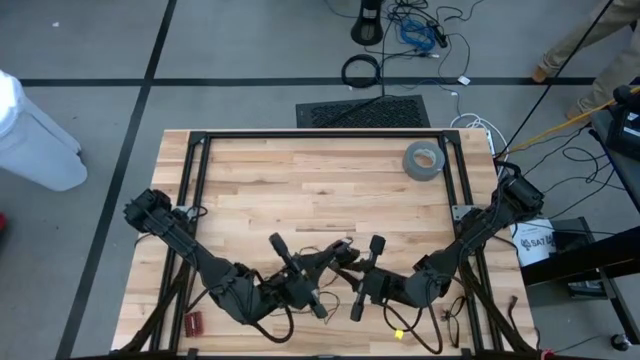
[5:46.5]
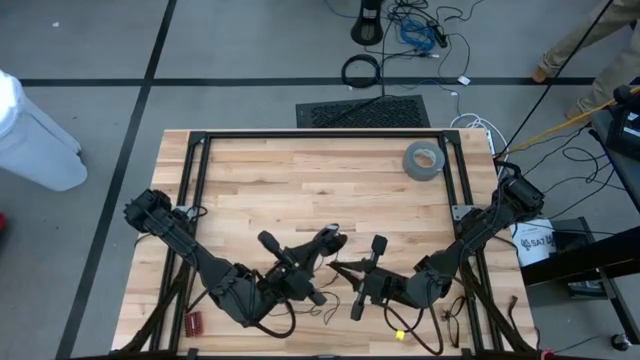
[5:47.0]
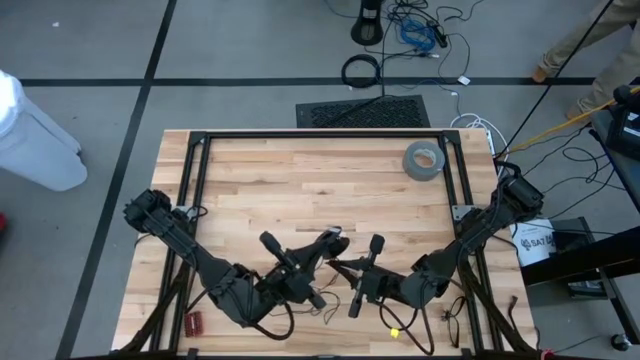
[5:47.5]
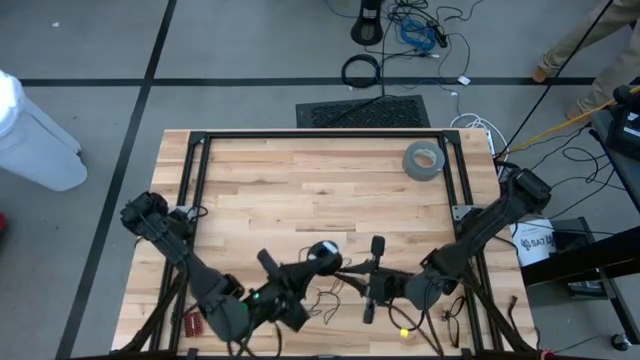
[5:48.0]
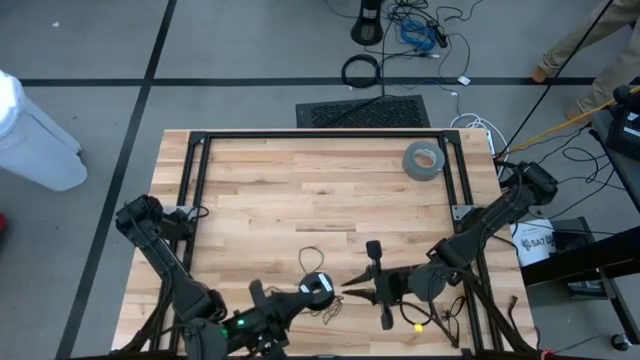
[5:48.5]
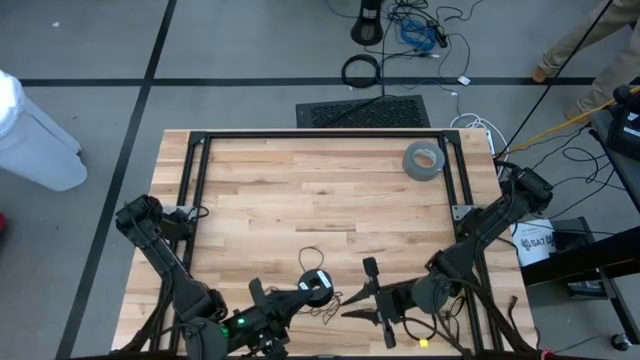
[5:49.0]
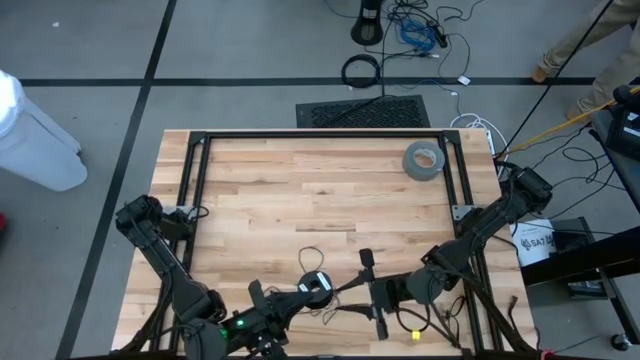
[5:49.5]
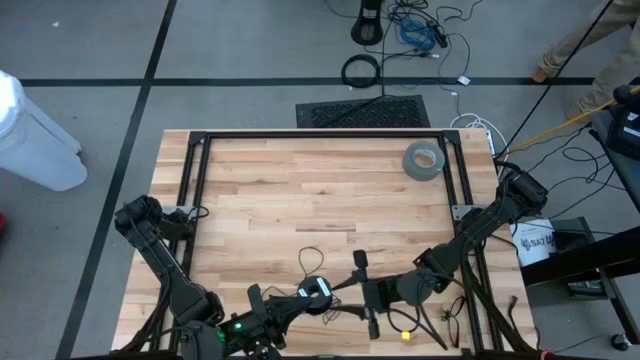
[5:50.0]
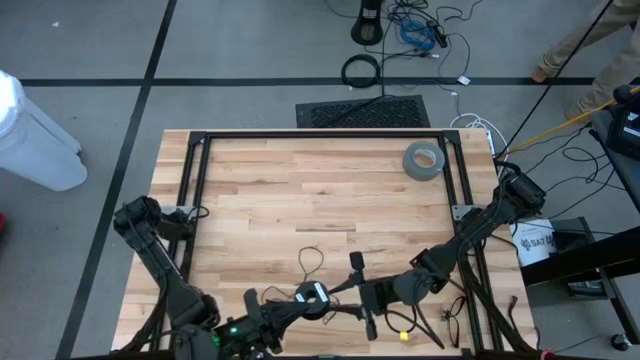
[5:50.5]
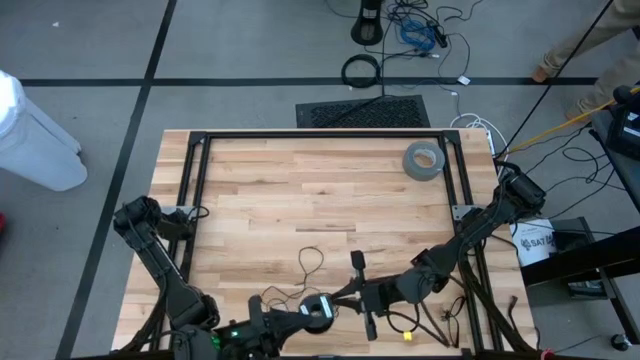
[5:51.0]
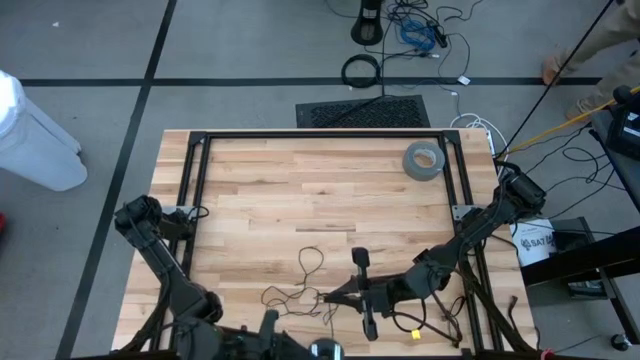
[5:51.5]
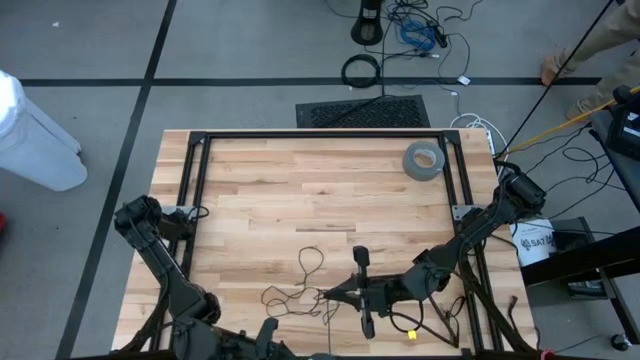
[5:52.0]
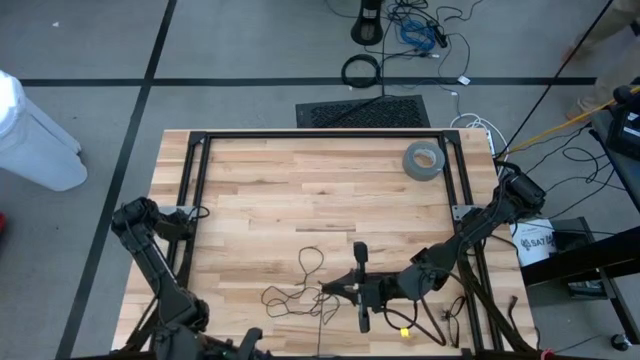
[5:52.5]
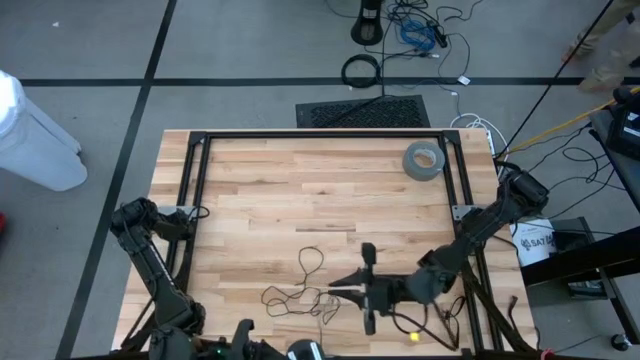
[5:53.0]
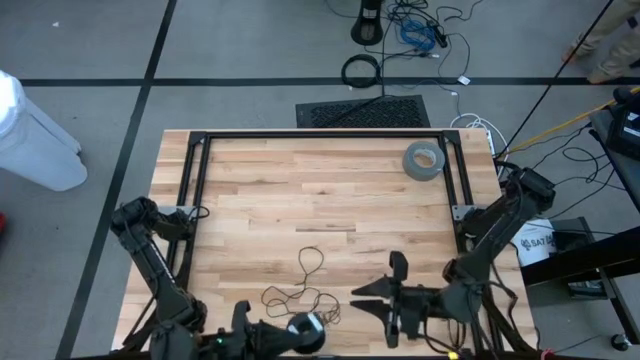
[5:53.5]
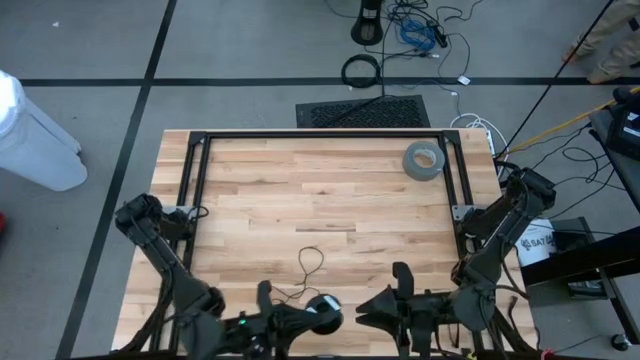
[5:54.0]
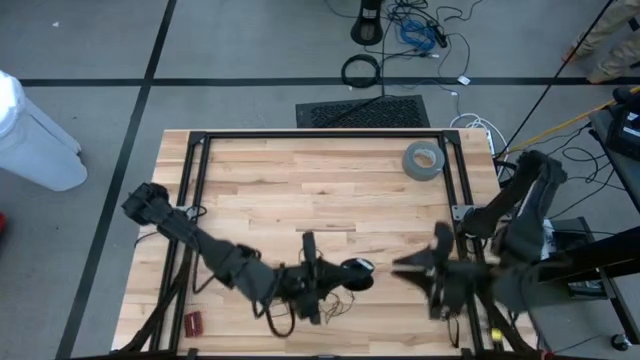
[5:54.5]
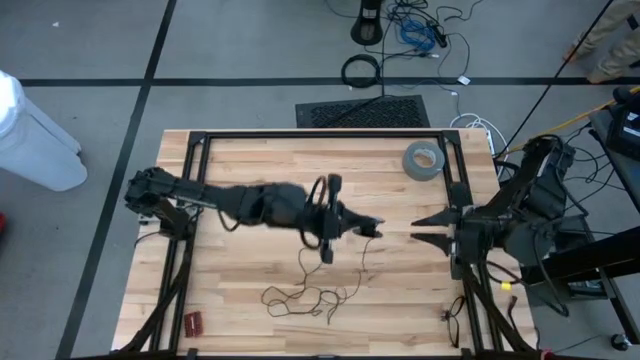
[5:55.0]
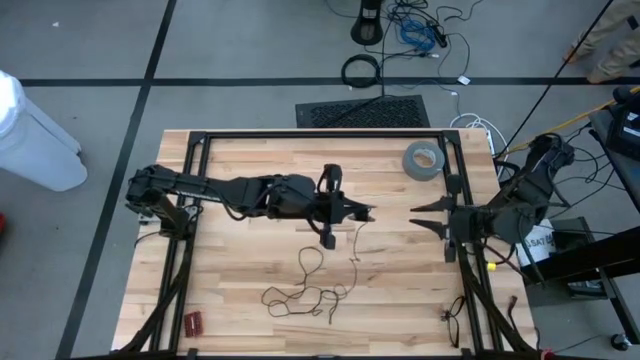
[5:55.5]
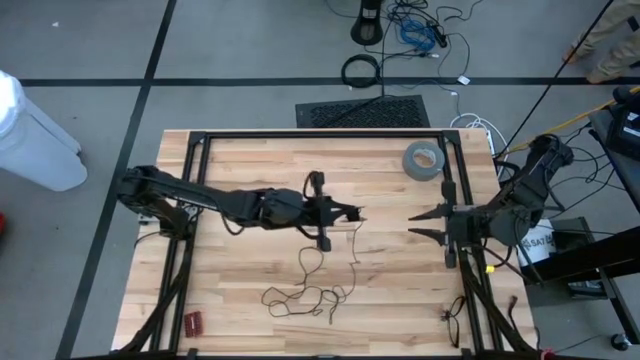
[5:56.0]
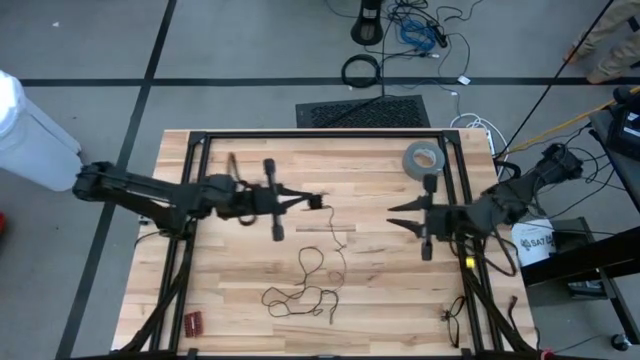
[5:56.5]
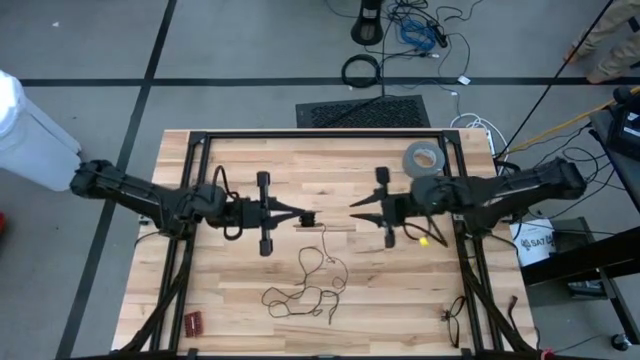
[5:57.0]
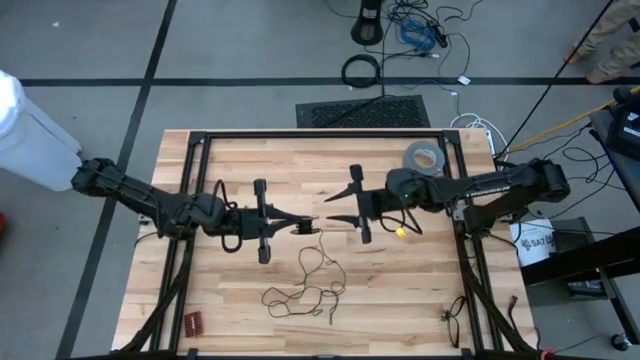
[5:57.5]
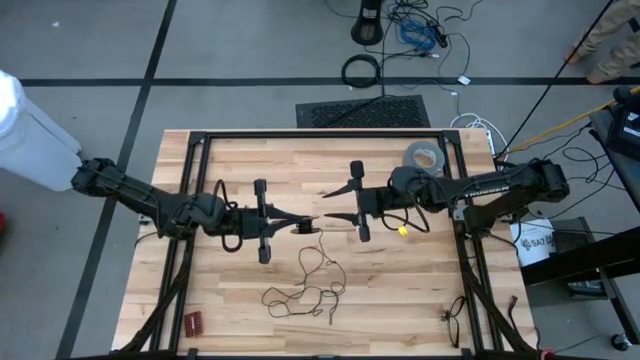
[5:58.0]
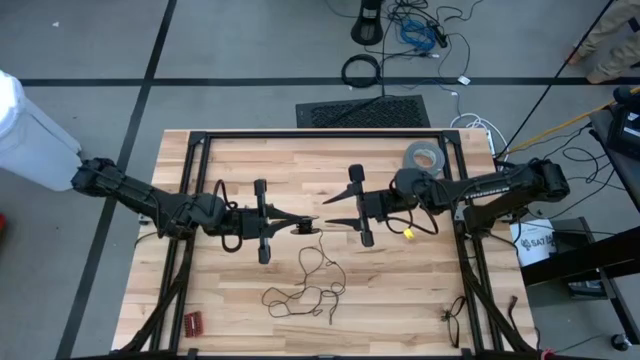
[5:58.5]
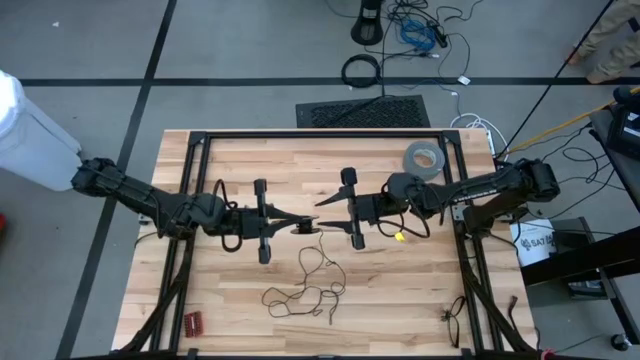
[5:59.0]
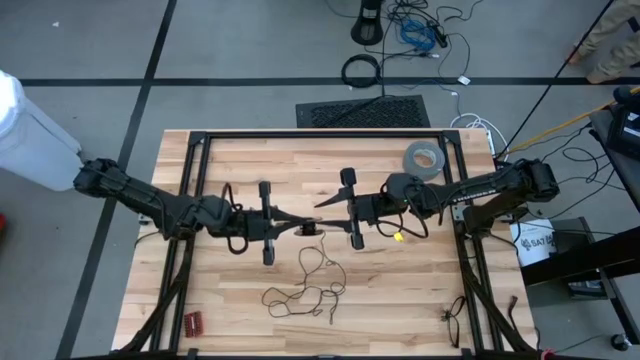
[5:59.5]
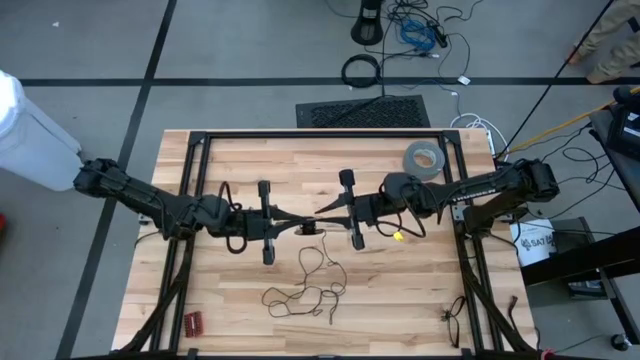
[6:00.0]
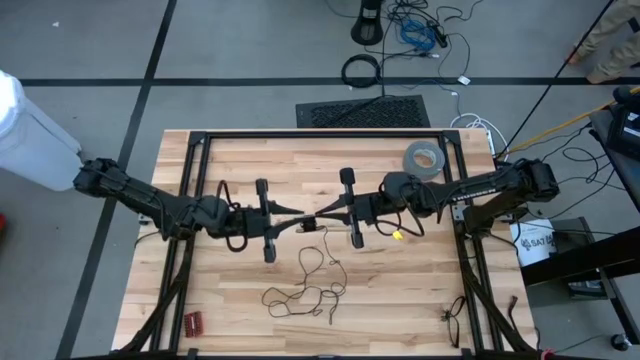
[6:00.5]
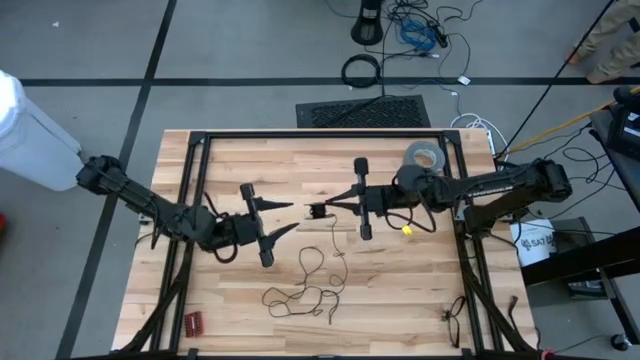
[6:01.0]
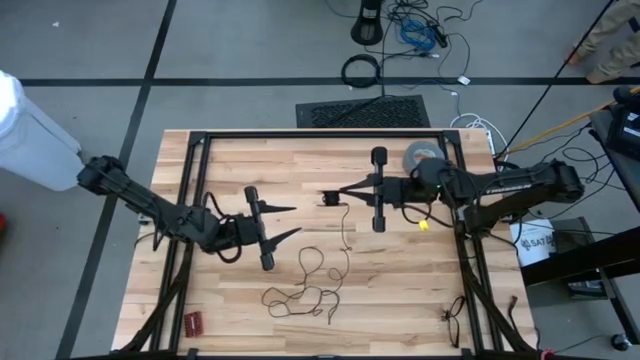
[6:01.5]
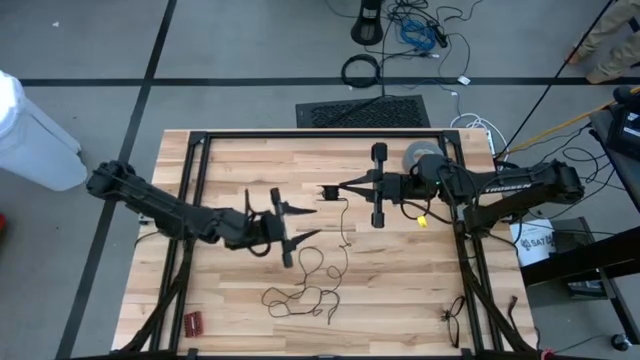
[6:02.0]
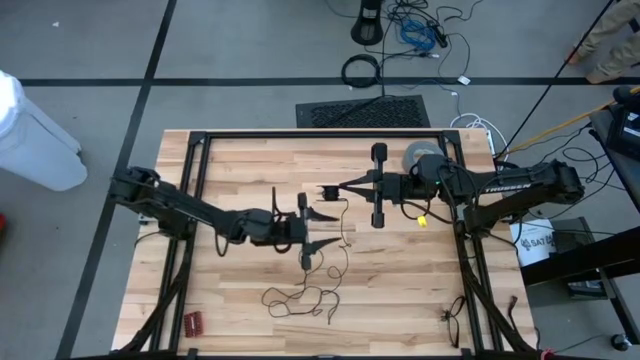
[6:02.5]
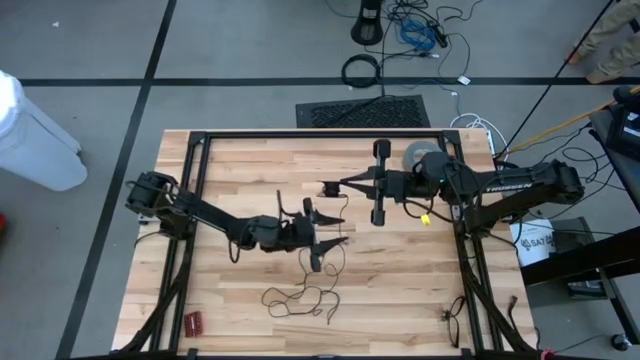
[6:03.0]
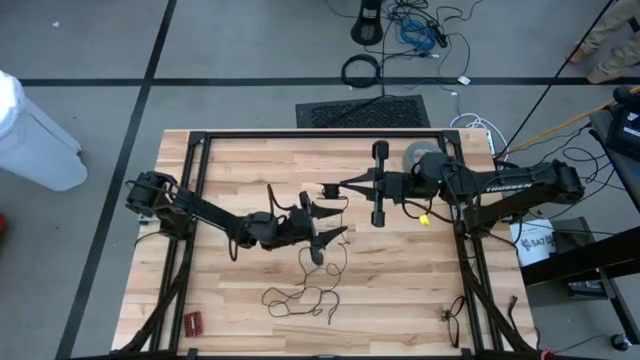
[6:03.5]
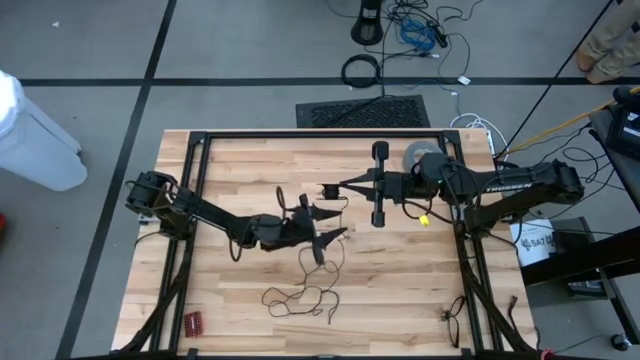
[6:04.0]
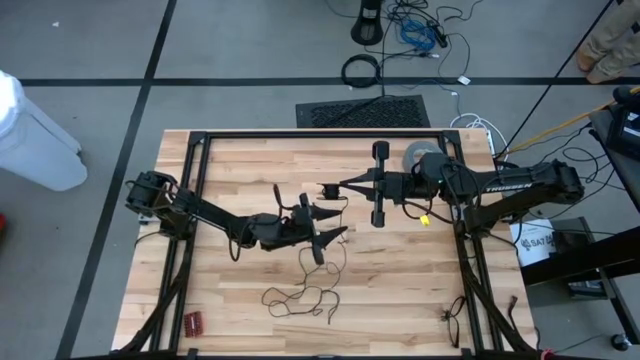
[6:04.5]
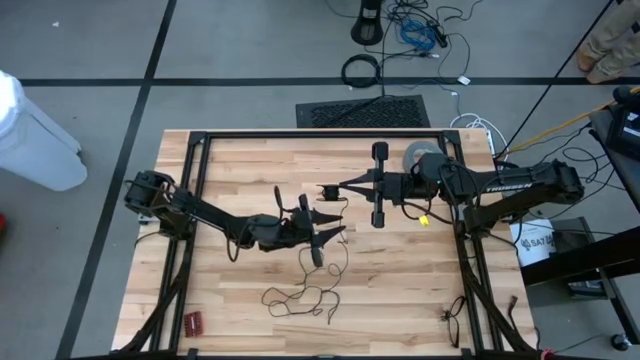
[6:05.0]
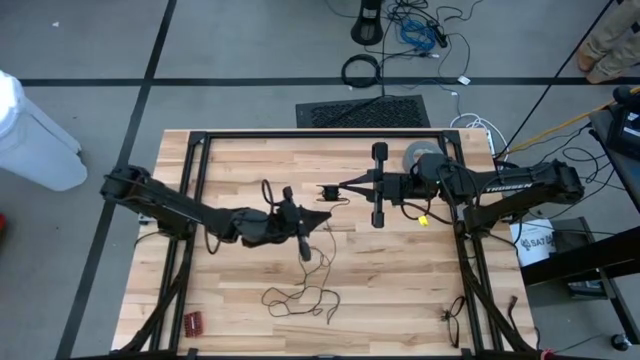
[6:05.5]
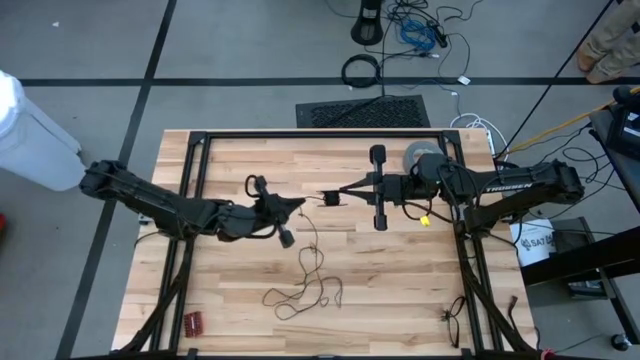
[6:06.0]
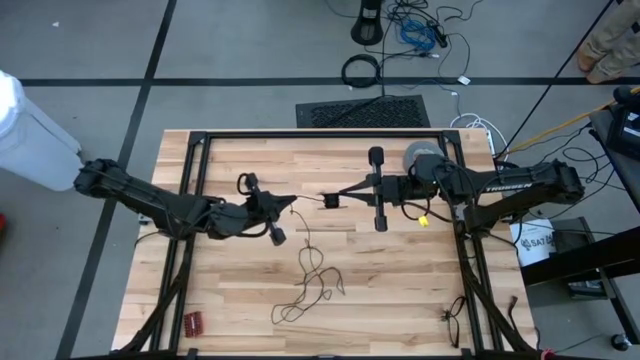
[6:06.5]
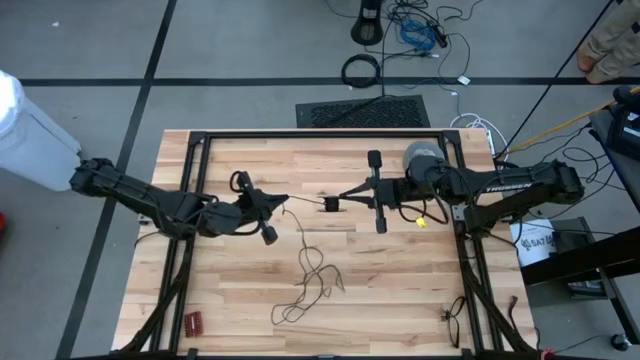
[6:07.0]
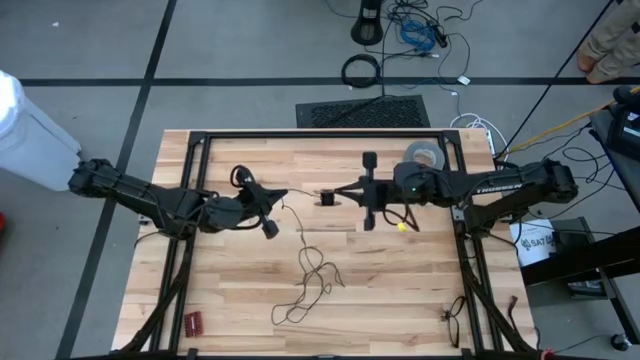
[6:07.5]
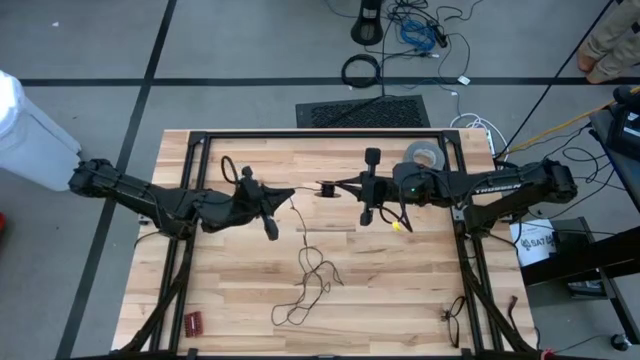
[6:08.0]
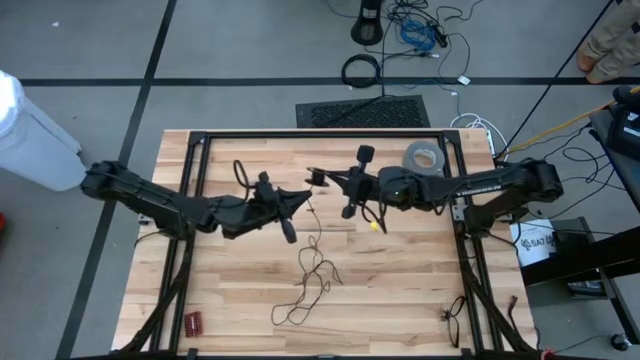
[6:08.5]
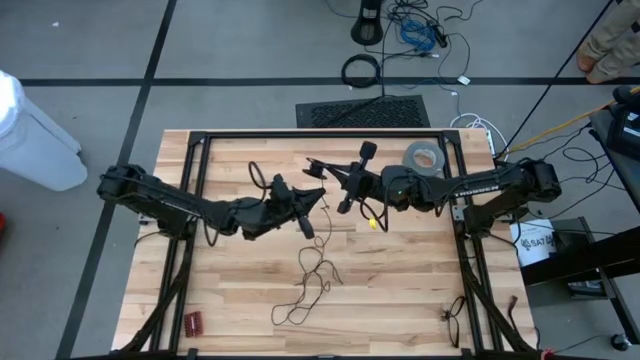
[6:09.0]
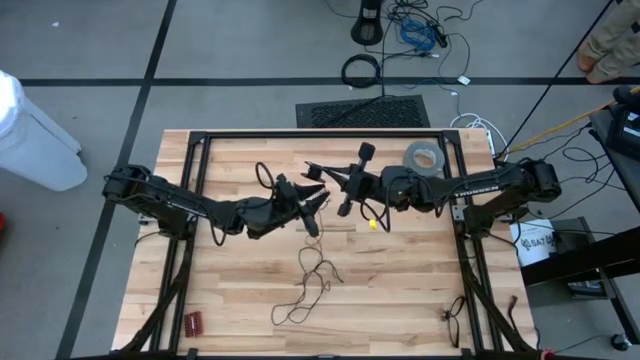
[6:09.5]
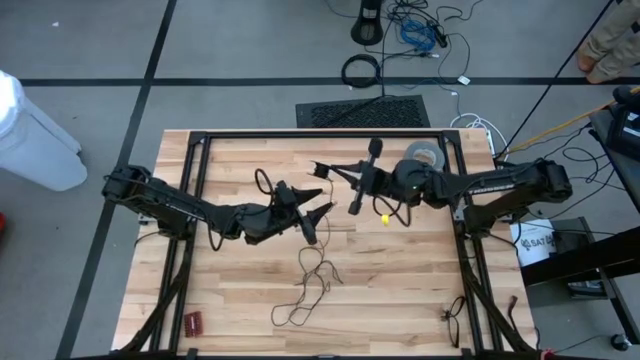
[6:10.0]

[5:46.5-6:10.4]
Task: Coil cords
Coil the black wire onto the spool
